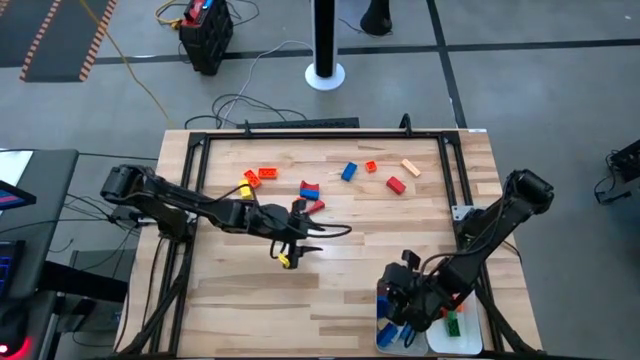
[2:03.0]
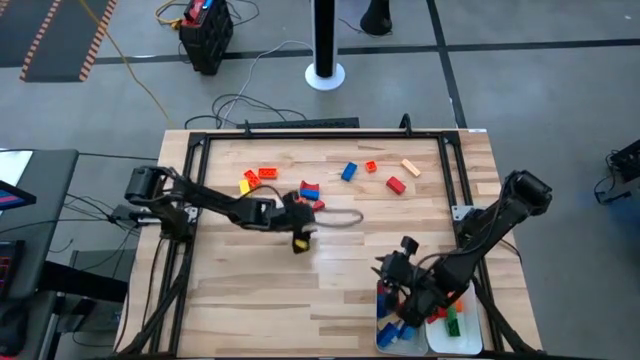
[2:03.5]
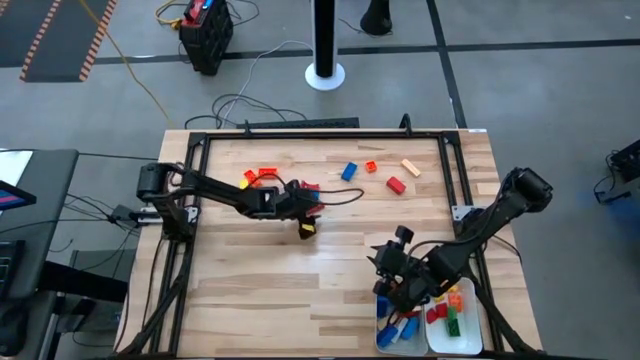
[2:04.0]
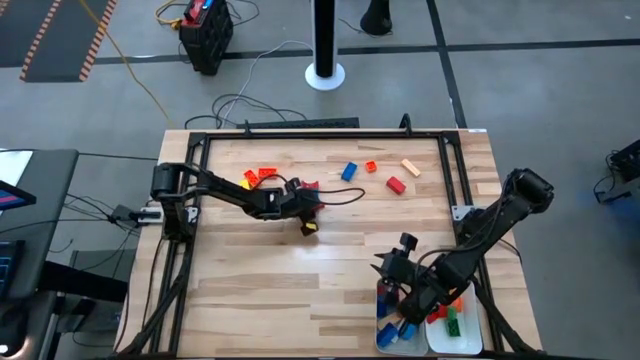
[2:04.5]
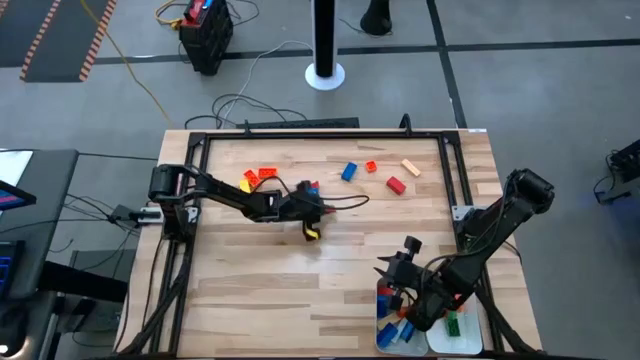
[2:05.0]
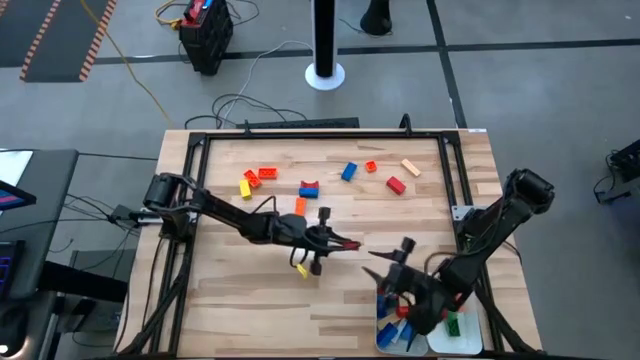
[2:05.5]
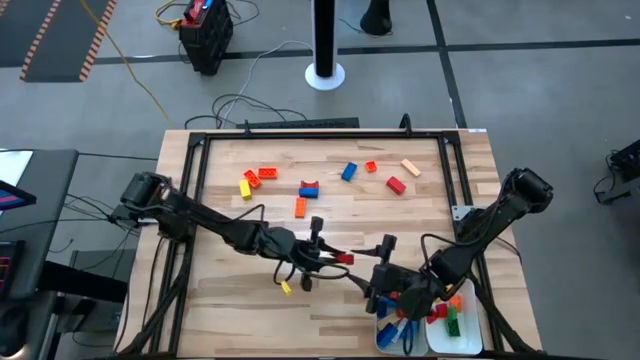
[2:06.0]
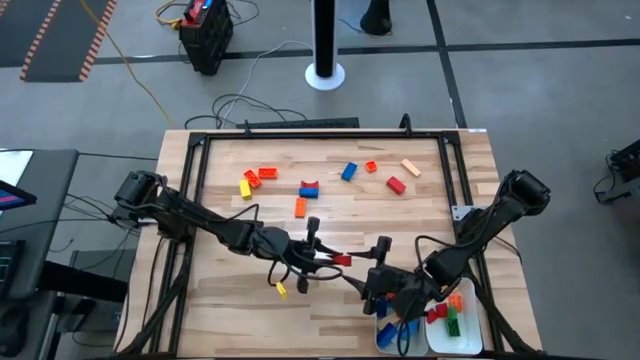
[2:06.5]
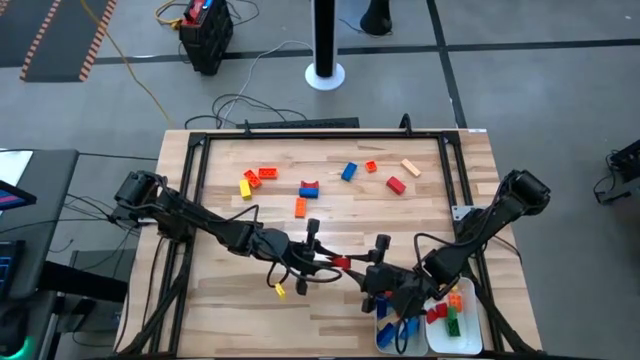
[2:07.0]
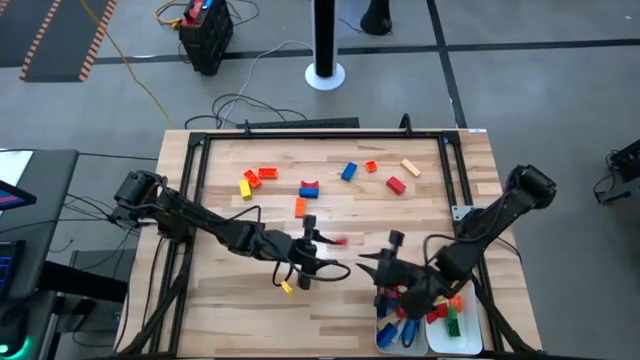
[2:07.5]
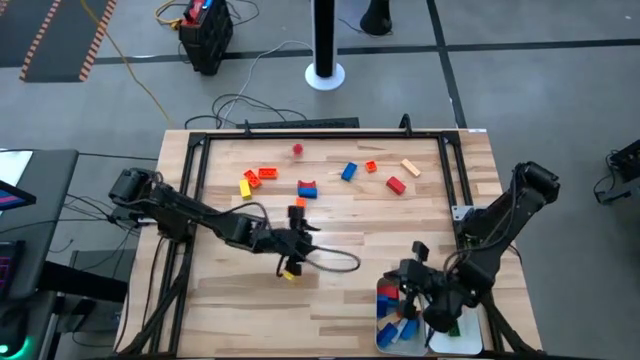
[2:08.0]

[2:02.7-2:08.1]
Task: Sort blocks by size
Put the large red wooden block into the gray bin

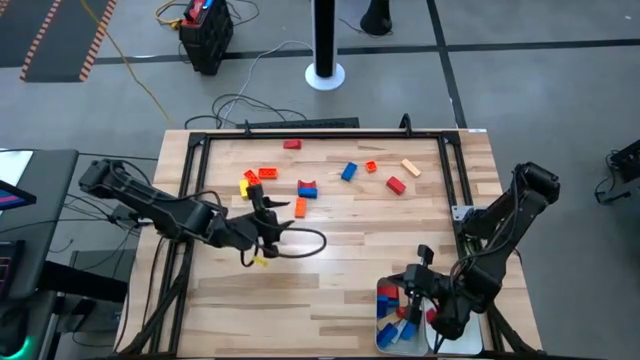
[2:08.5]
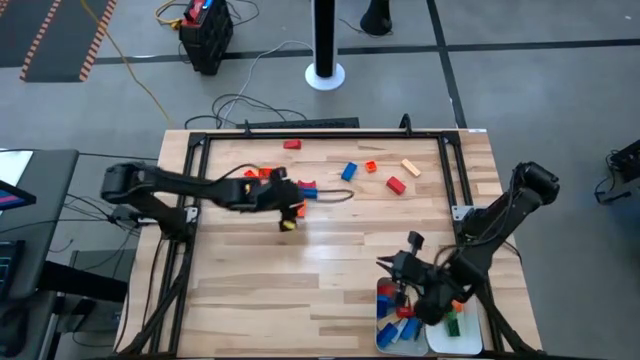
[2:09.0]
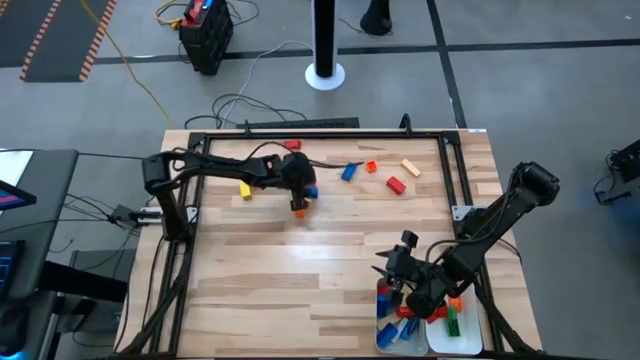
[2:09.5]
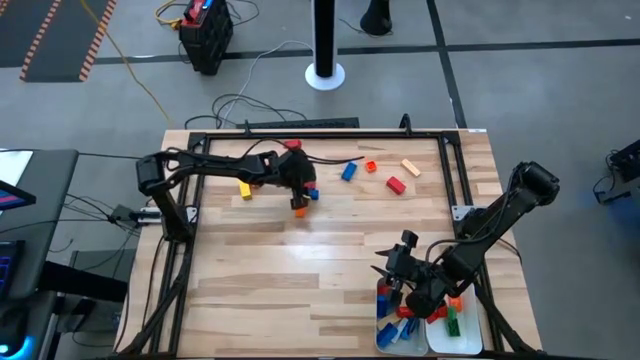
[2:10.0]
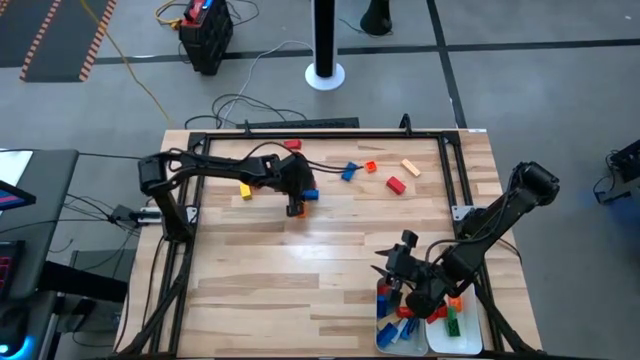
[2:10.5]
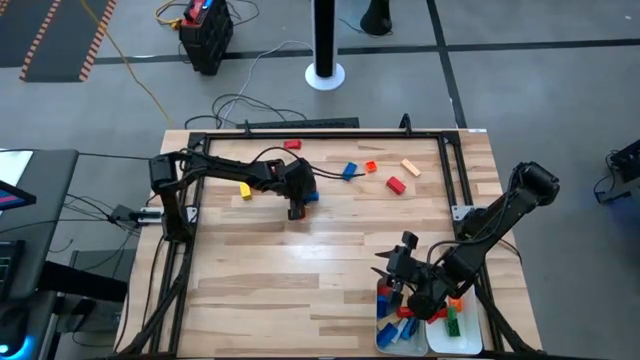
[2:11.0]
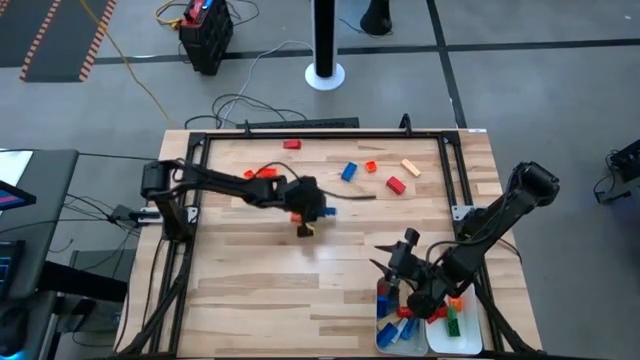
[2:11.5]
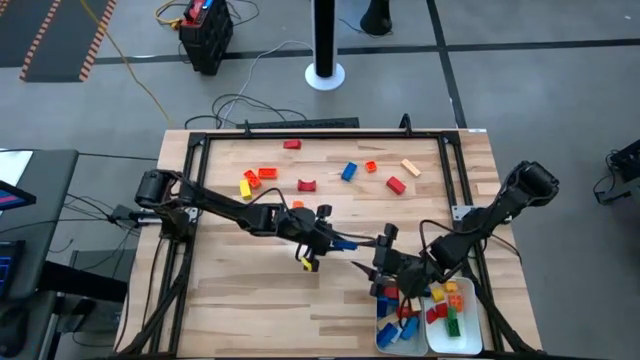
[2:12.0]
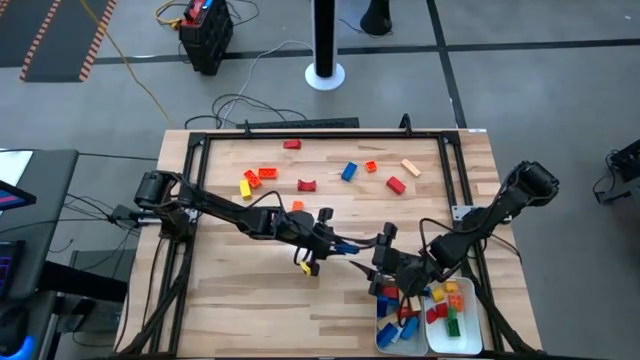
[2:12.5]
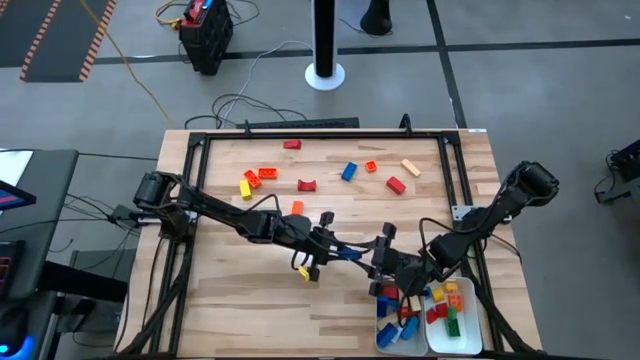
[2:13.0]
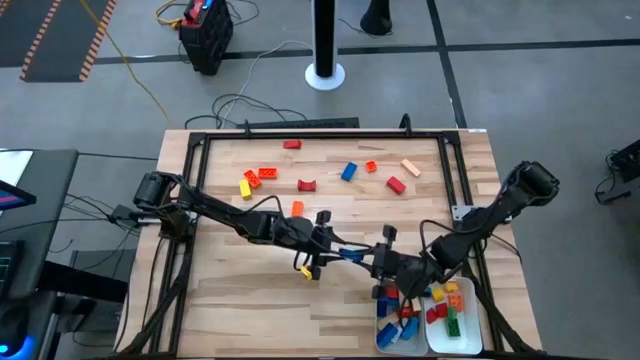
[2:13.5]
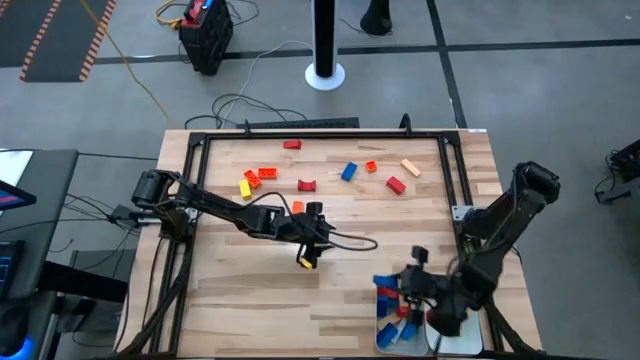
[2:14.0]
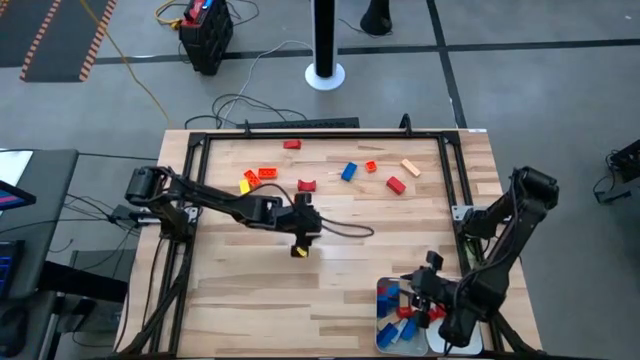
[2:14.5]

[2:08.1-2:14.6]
Put the large blue game piece into the gray bin

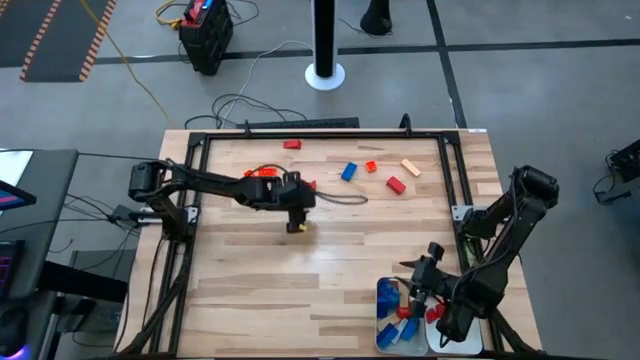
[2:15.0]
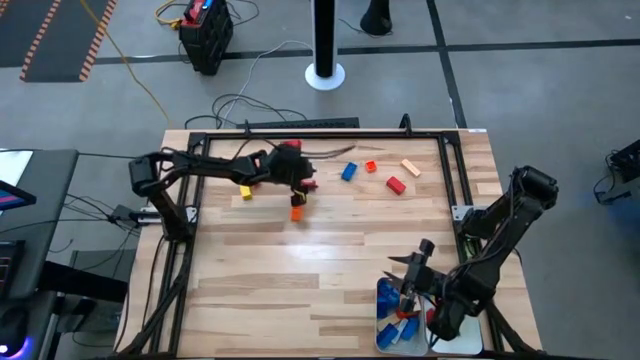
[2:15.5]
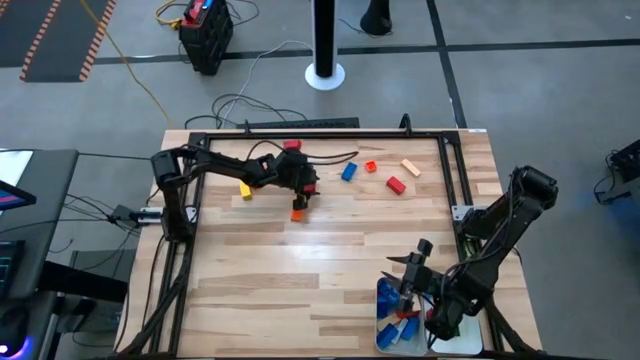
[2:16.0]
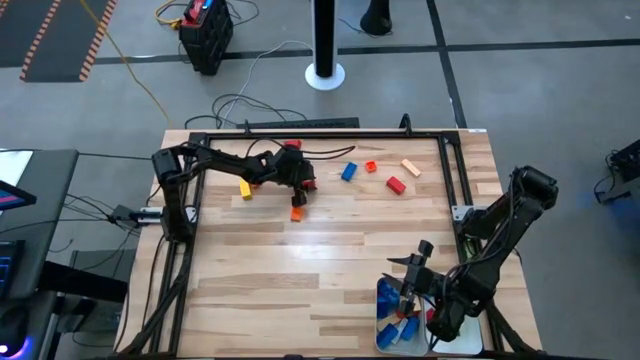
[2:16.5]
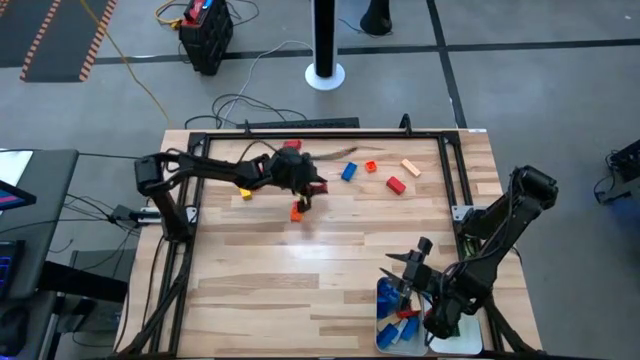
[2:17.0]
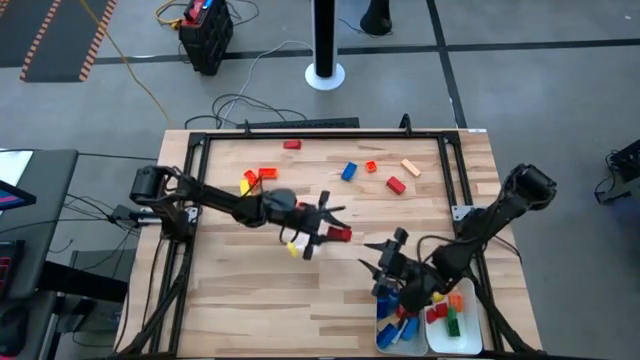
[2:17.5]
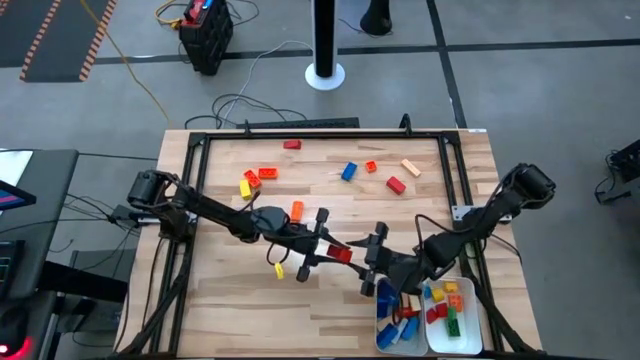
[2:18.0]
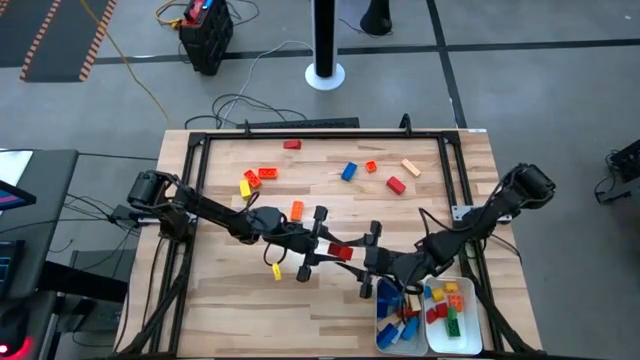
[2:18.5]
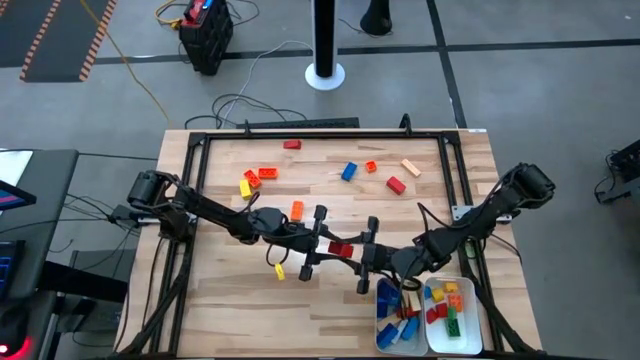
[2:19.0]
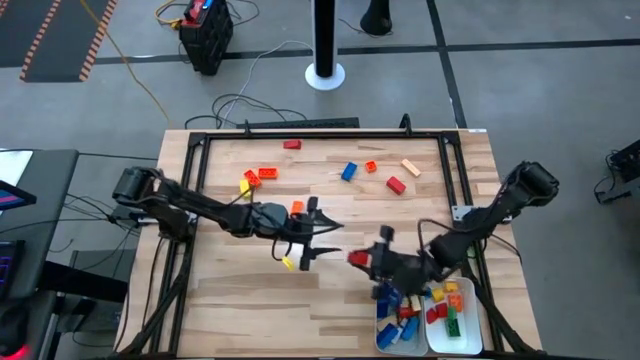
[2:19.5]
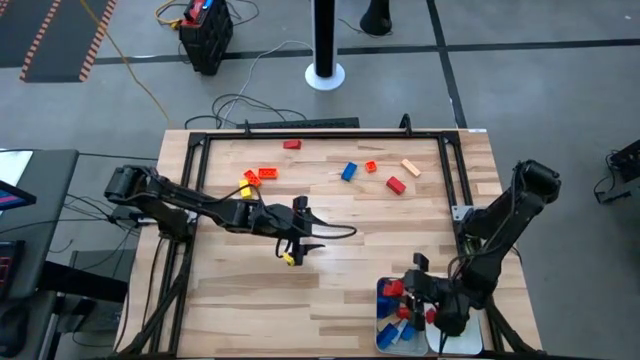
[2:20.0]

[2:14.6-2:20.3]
Put the large red wooden block into the gray bin

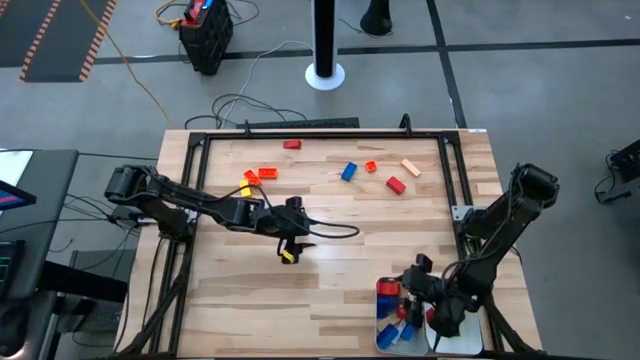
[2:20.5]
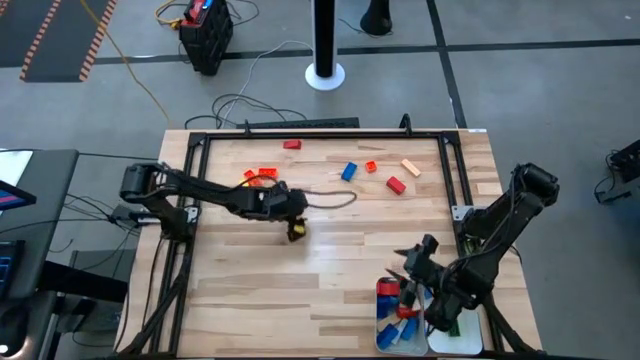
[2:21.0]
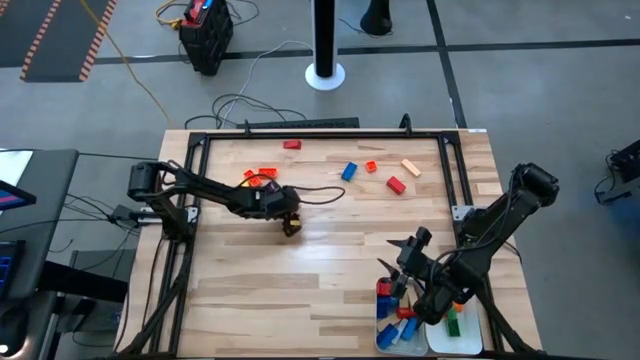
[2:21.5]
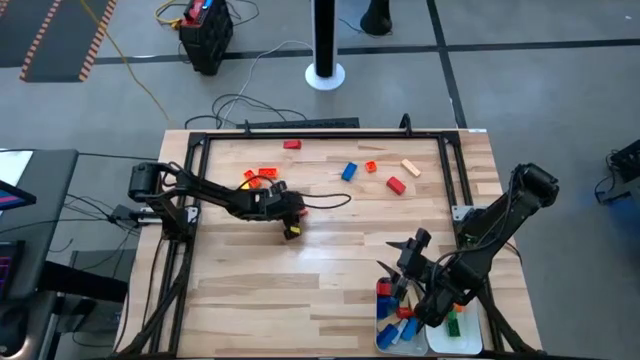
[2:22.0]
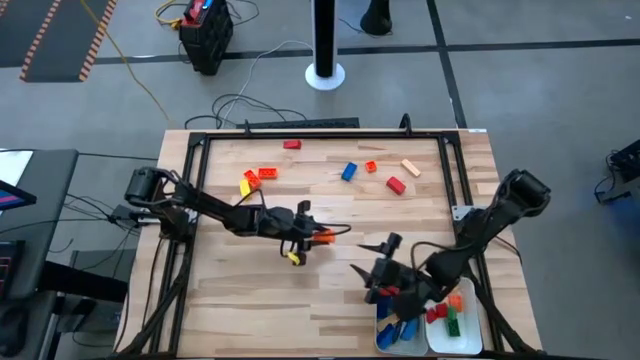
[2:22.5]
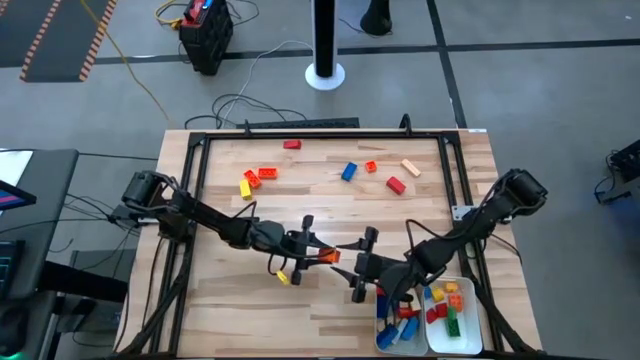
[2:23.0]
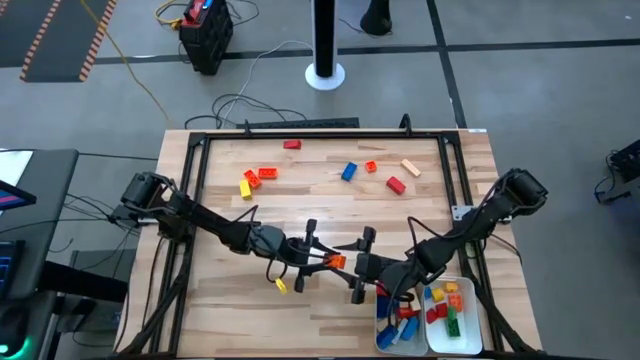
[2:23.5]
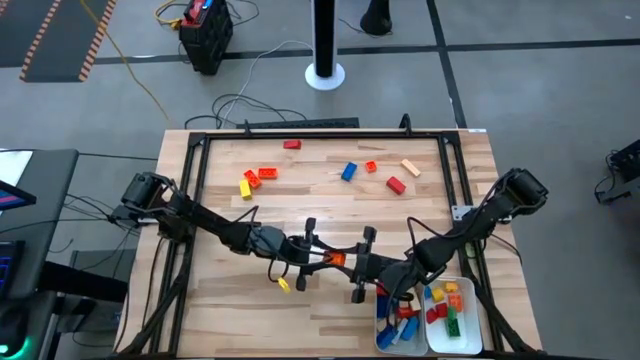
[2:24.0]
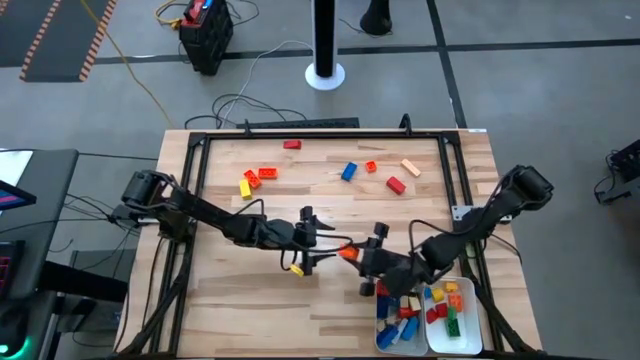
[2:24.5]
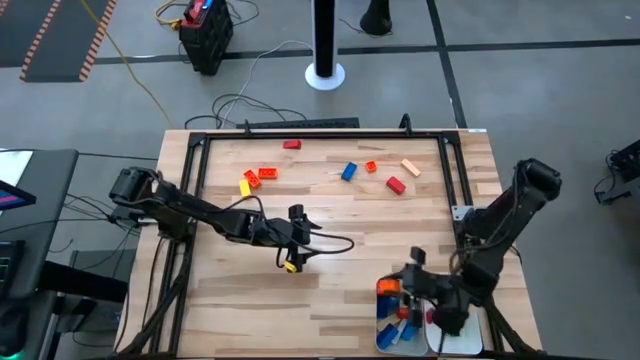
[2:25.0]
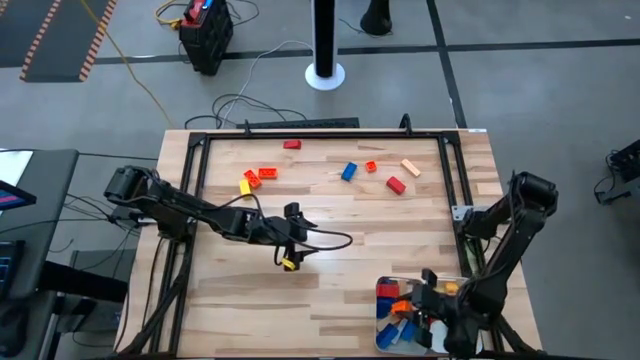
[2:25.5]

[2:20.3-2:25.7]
Put the large orange game piece into the gray bin
